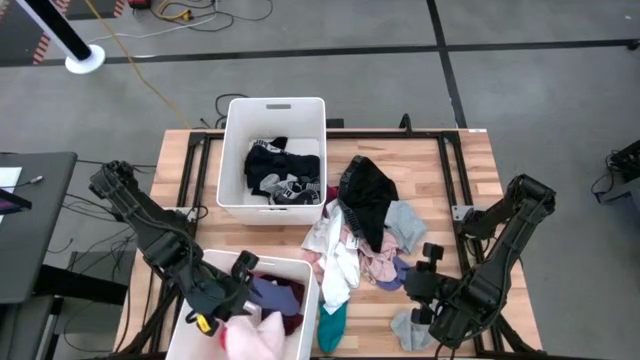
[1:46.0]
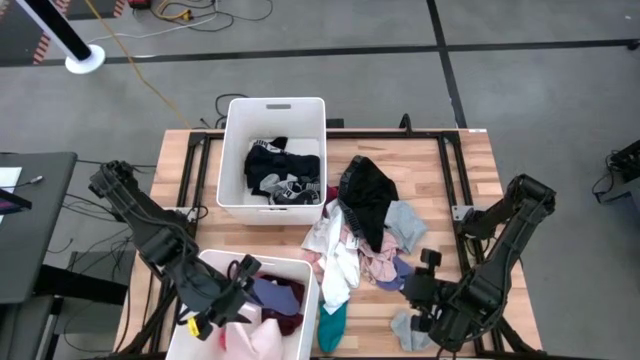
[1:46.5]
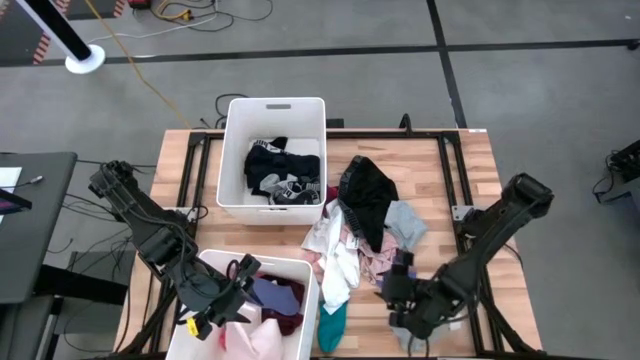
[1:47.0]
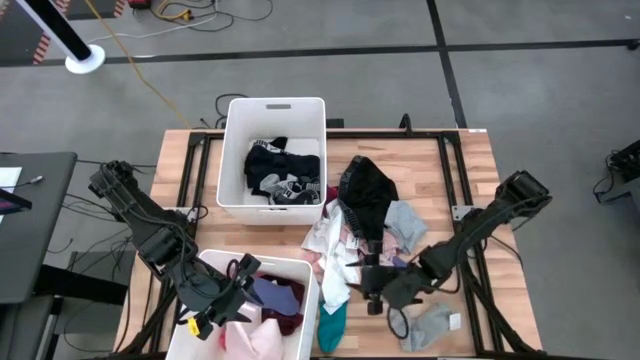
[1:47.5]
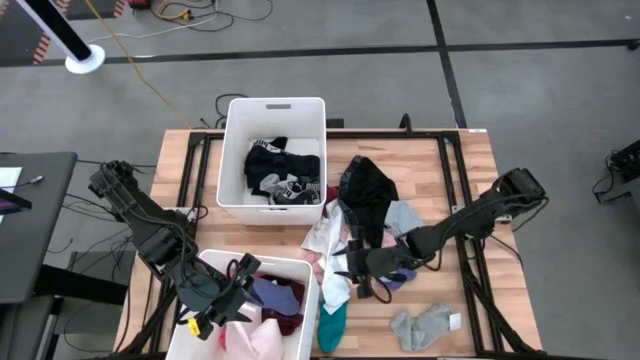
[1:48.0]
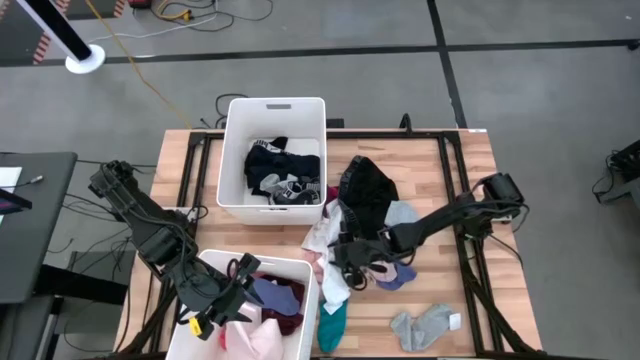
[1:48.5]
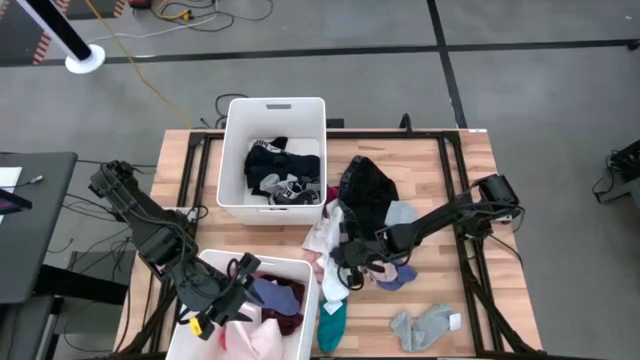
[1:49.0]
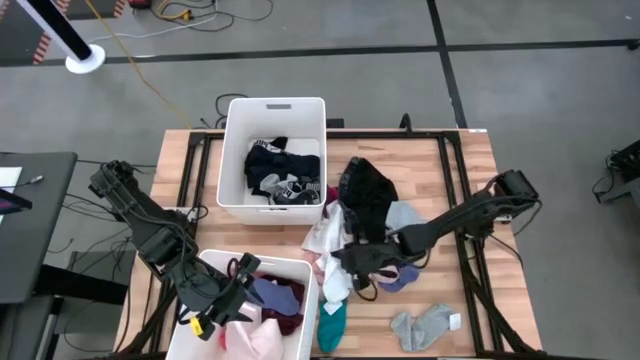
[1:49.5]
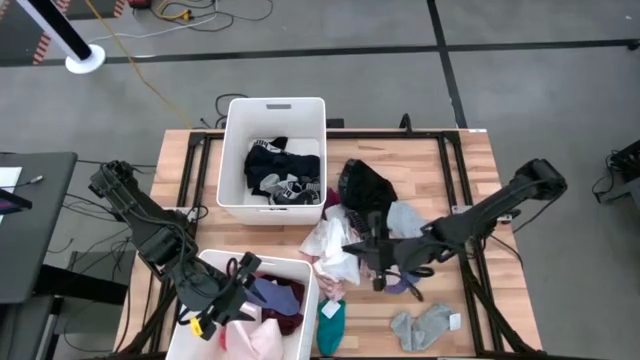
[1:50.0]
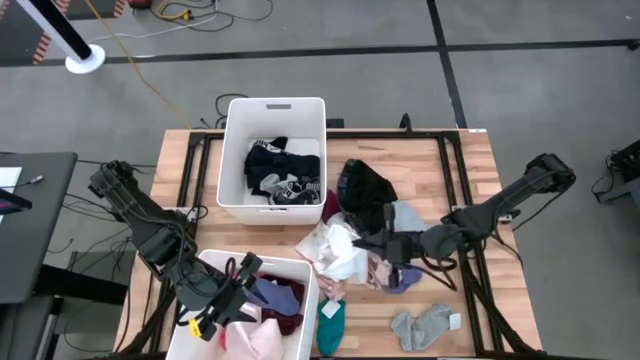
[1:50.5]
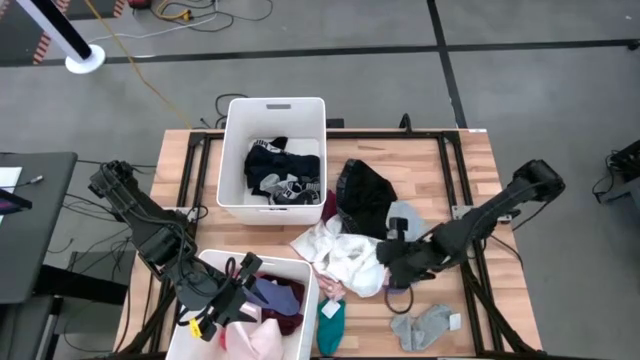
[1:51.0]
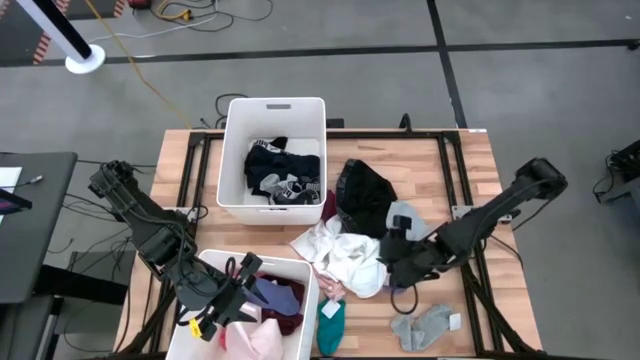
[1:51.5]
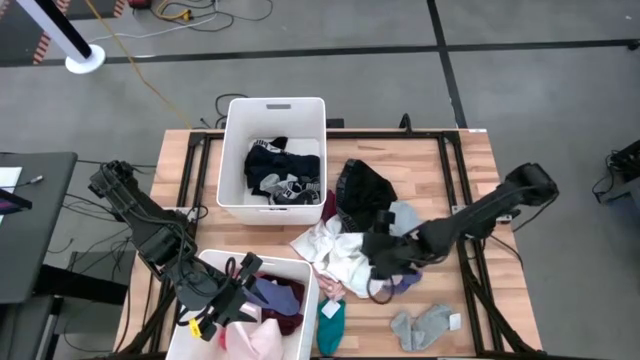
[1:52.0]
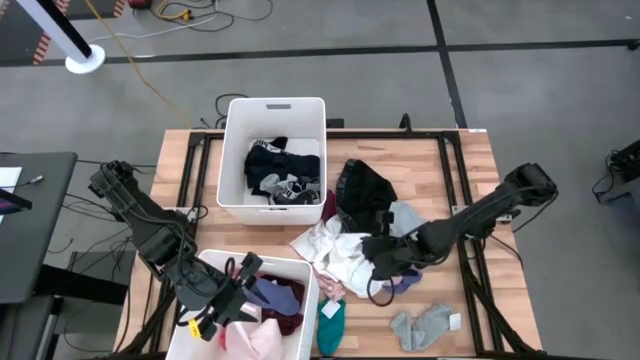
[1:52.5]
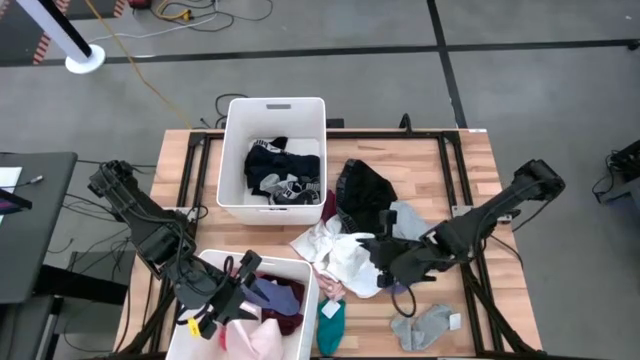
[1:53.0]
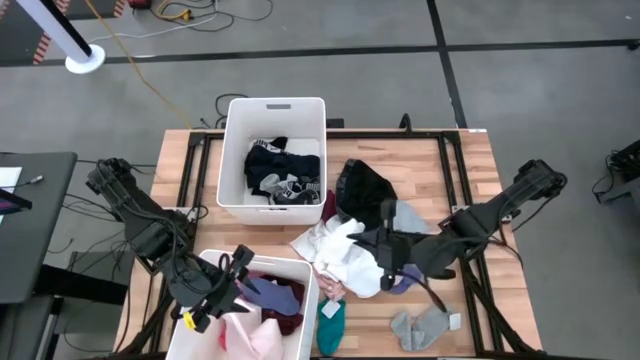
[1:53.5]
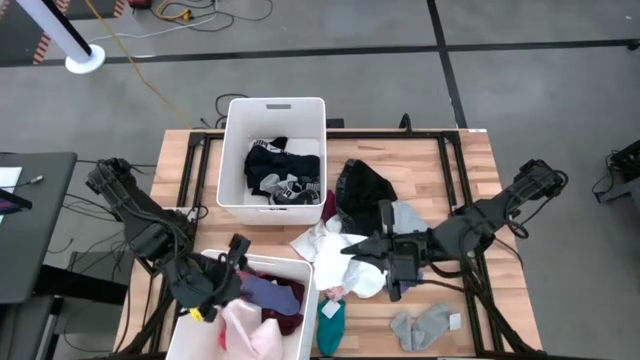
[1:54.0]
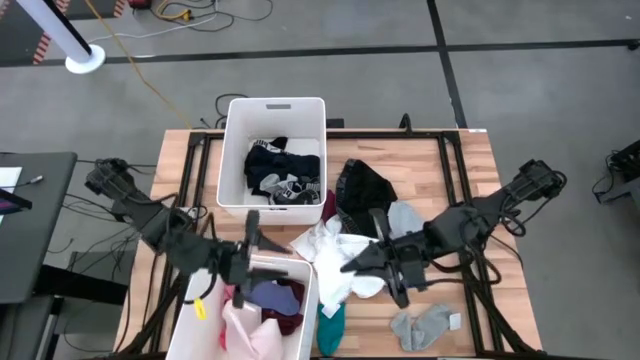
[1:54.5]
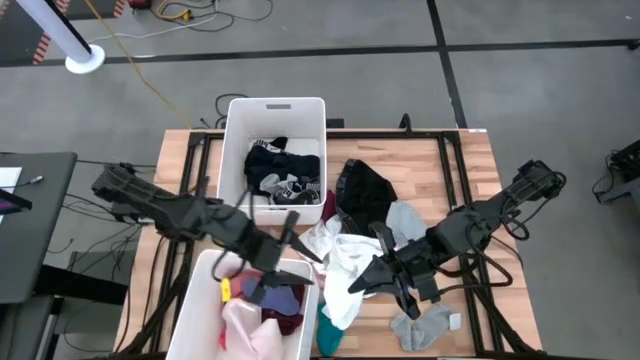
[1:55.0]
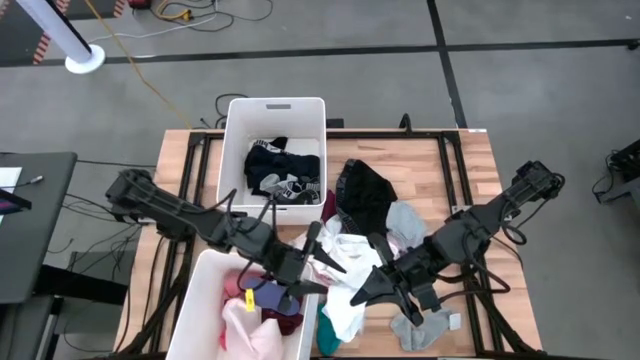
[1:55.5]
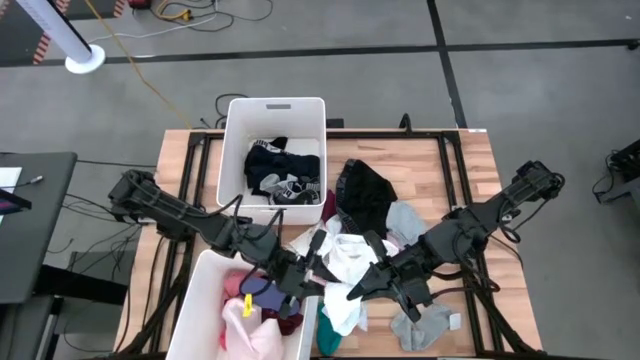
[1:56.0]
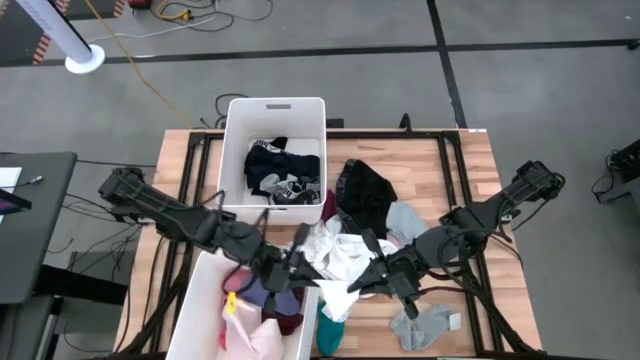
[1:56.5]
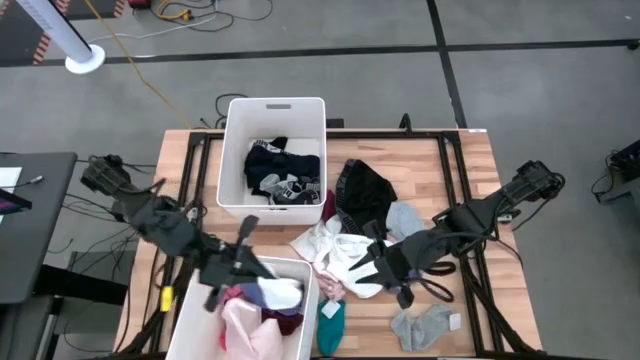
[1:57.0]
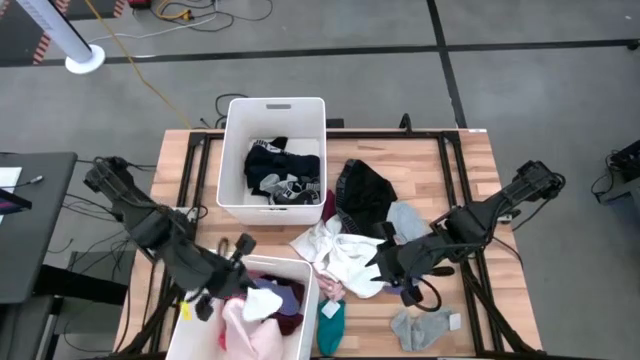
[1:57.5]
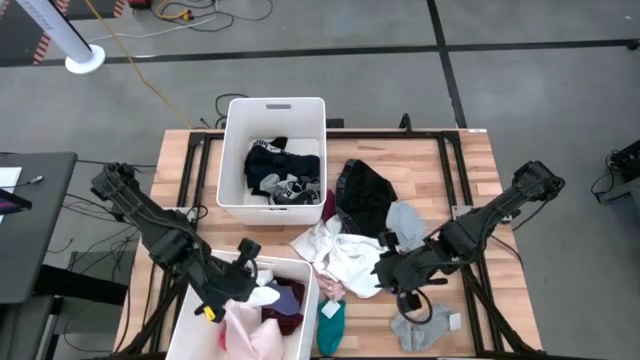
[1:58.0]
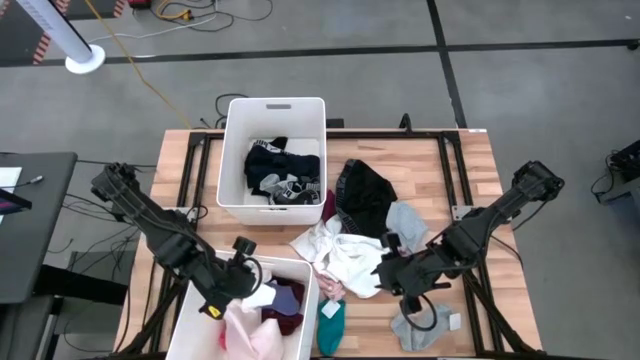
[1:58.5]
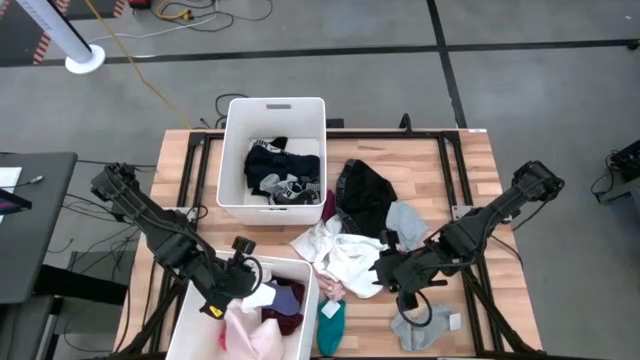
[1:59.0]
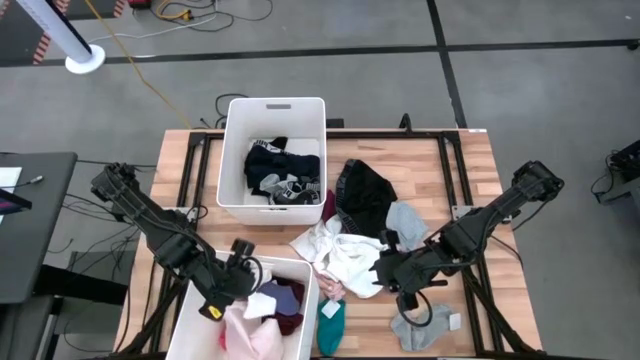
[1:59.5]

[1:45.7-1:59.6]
Task: Sort clothes
Put the white sock into the bottom white laundry bin
